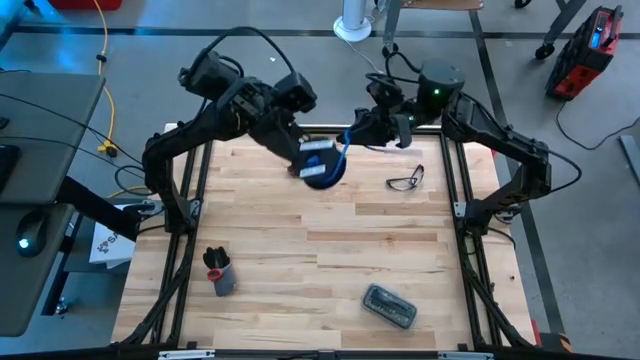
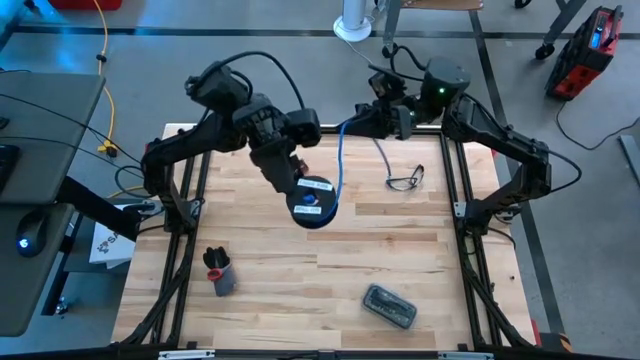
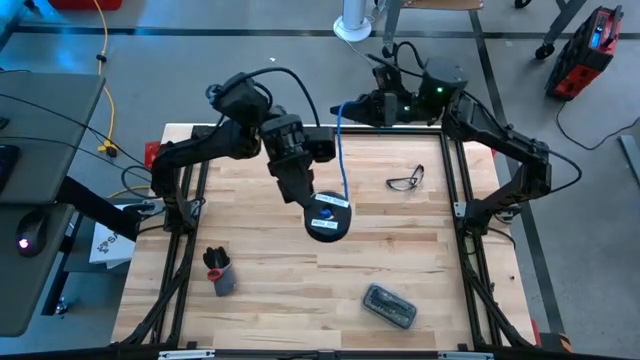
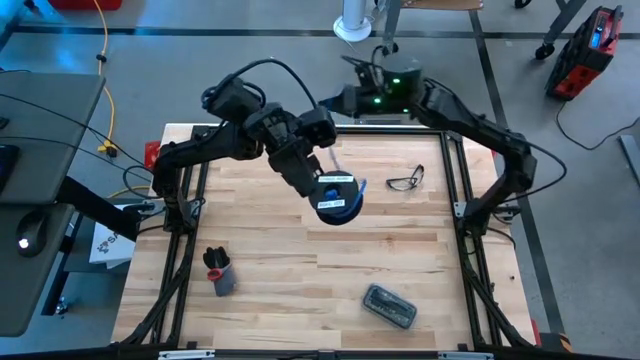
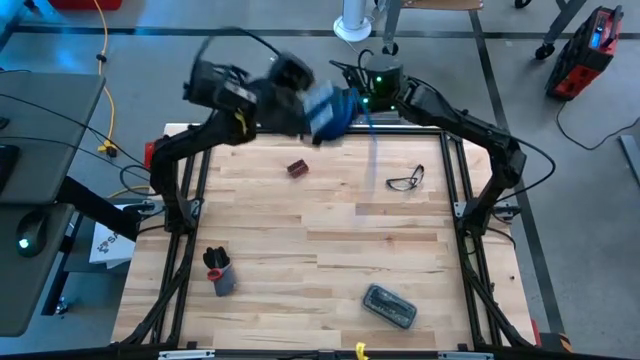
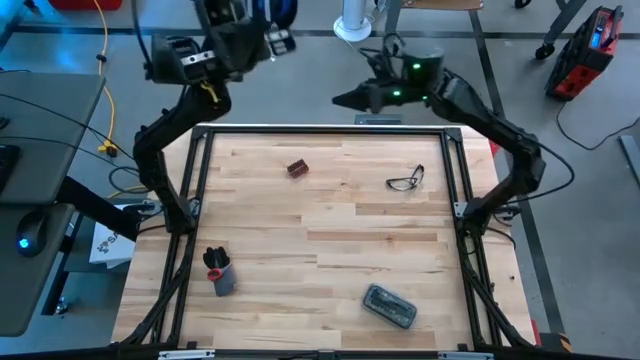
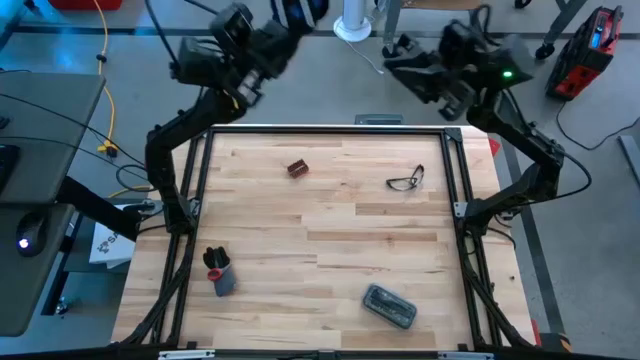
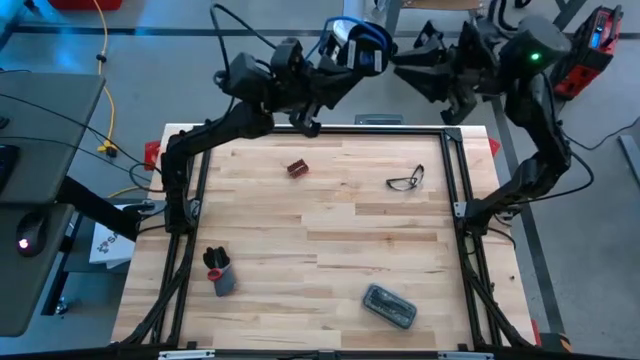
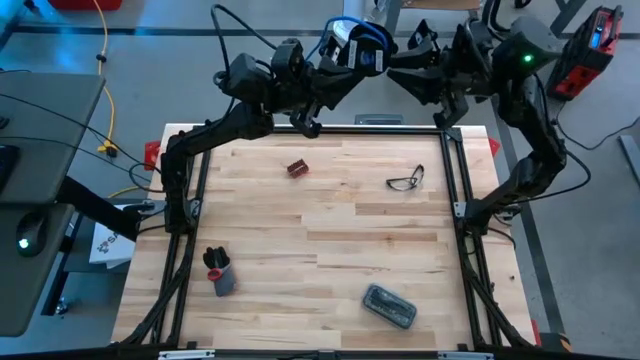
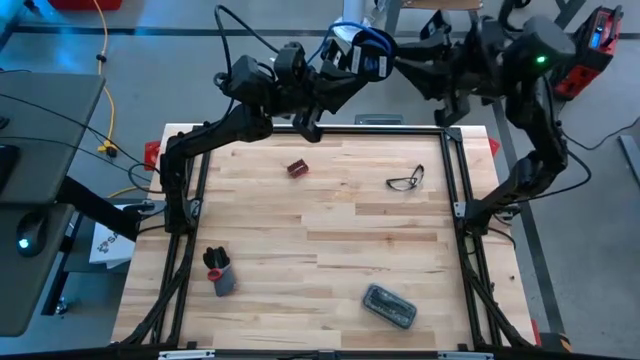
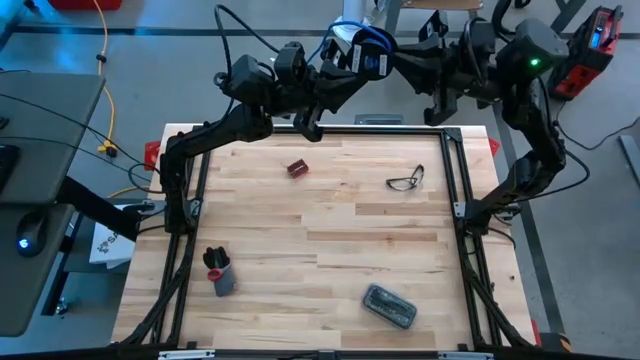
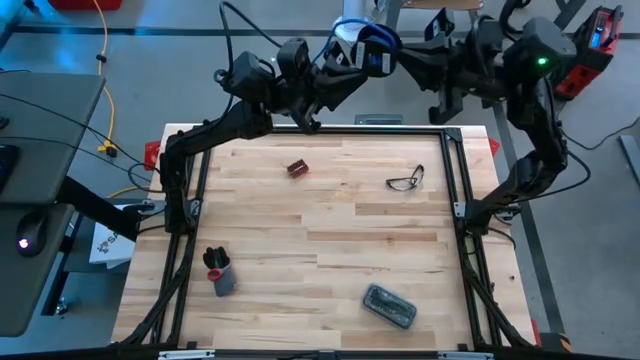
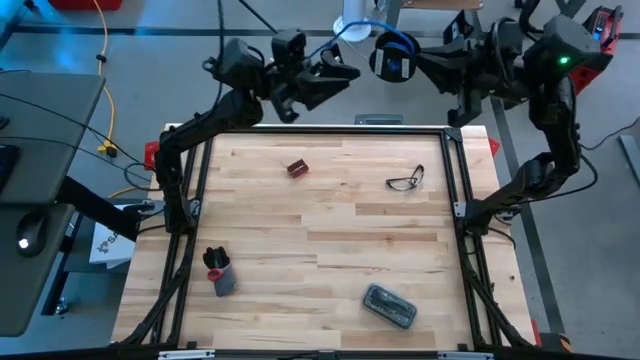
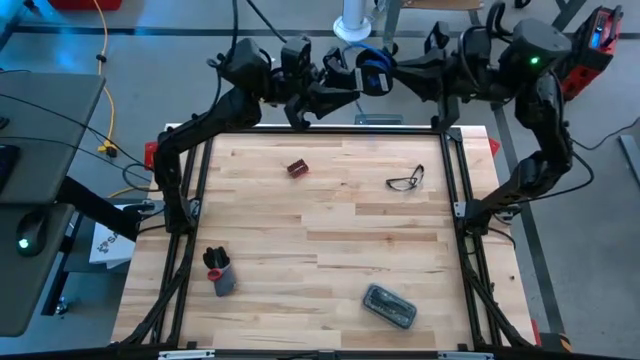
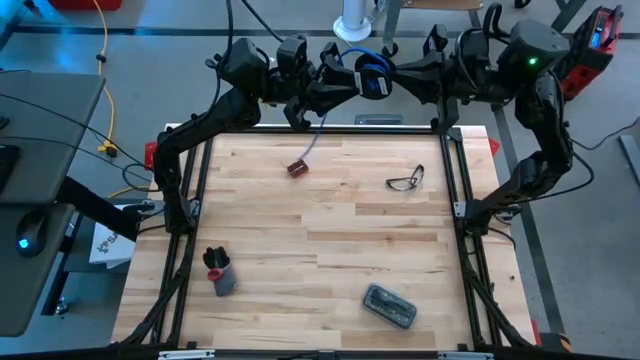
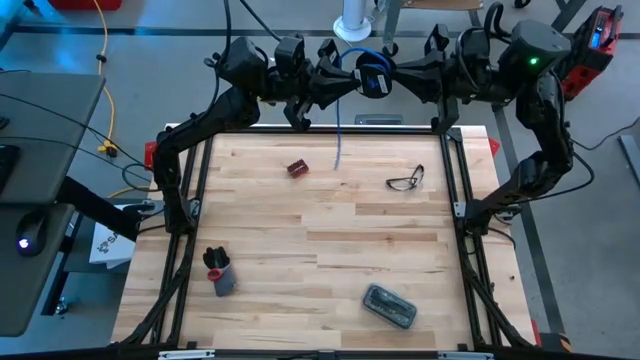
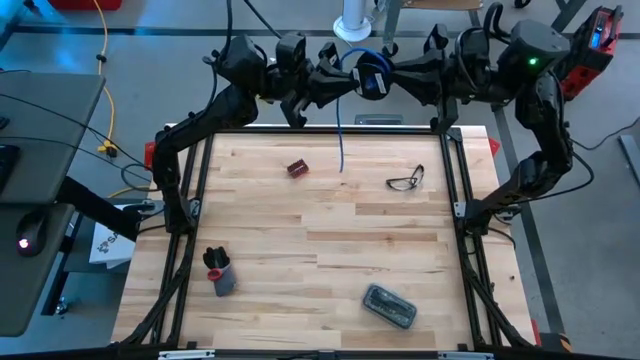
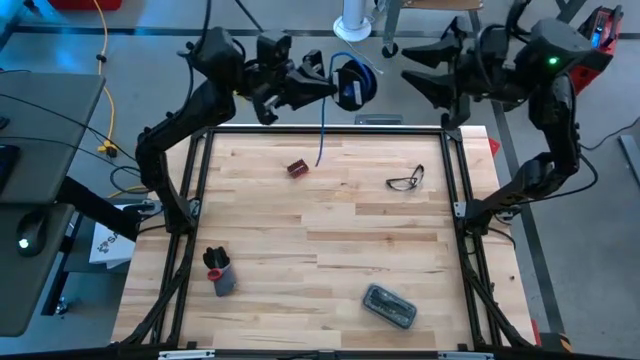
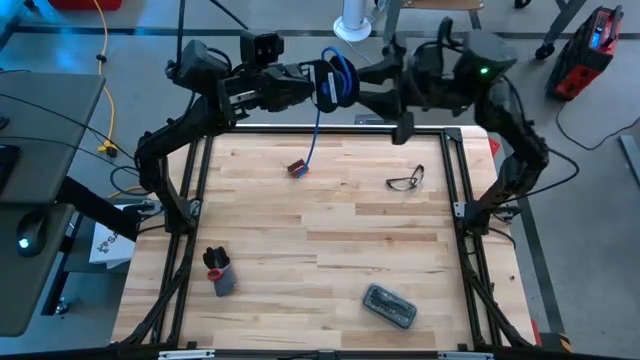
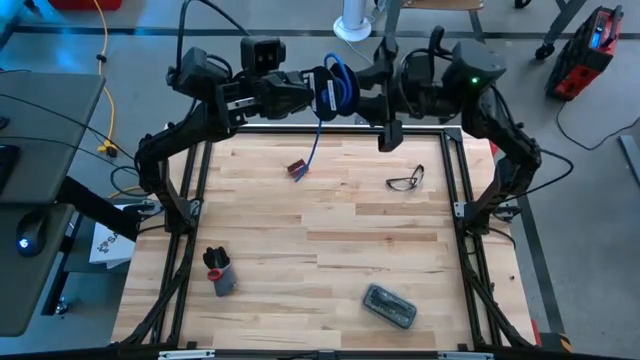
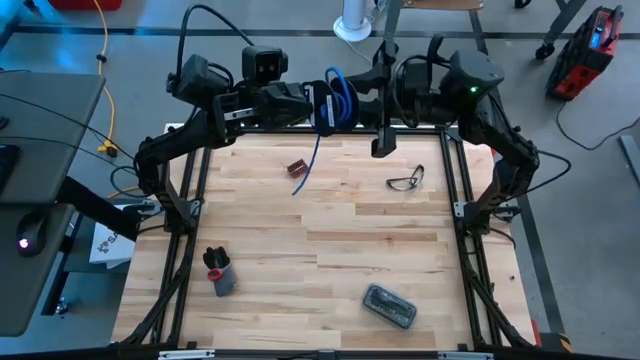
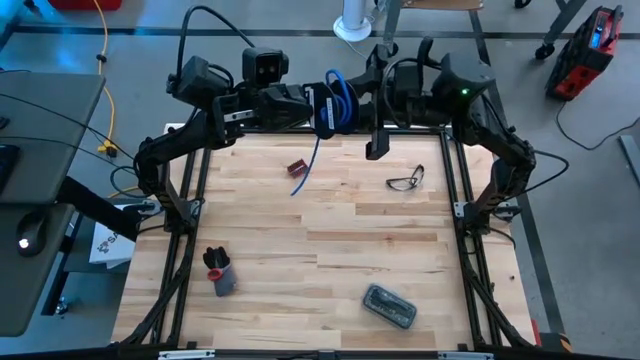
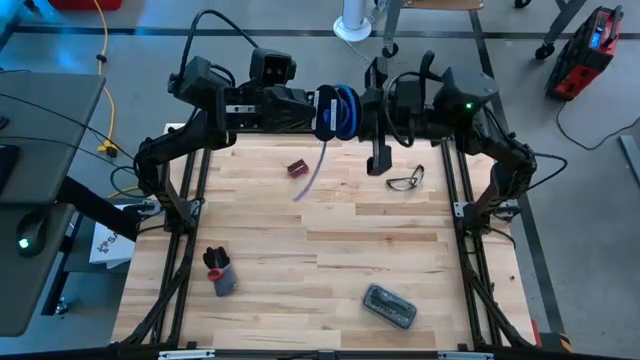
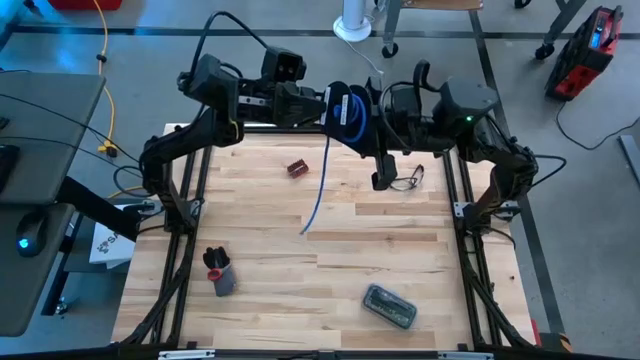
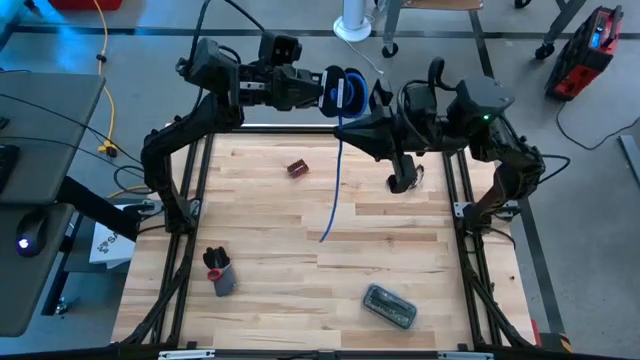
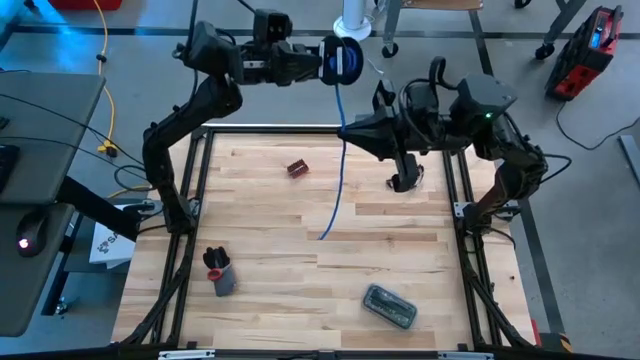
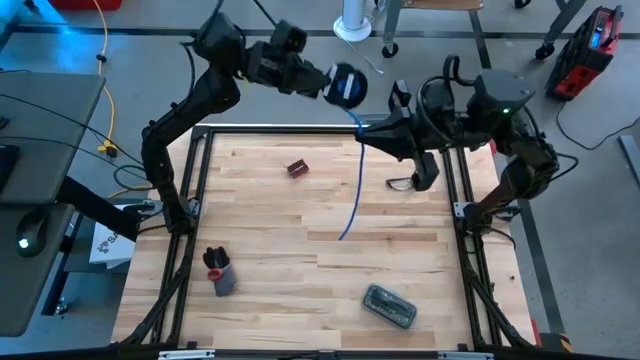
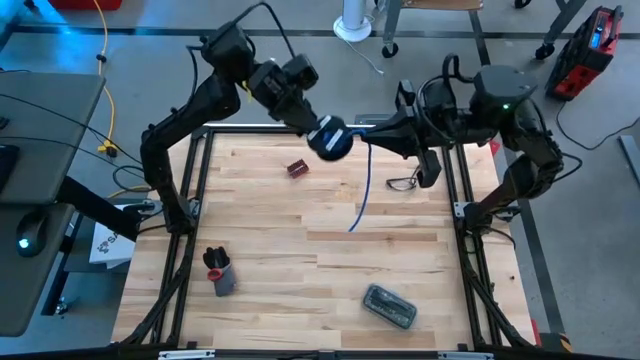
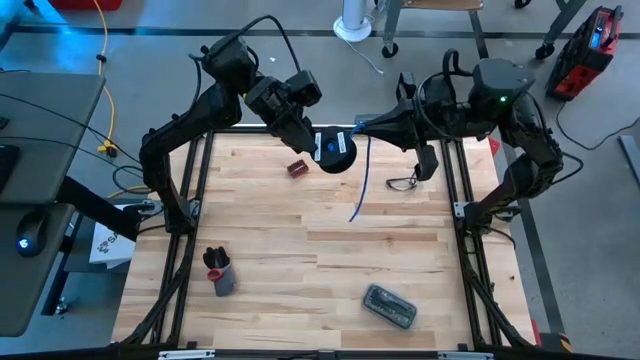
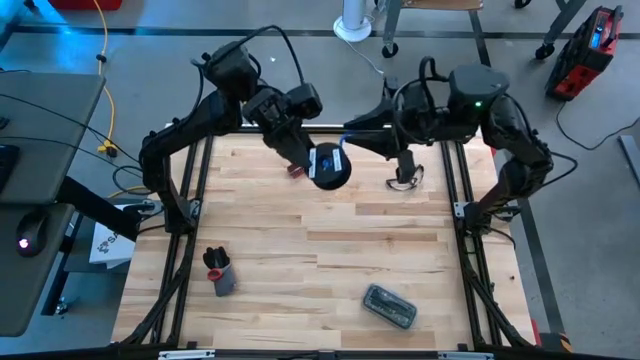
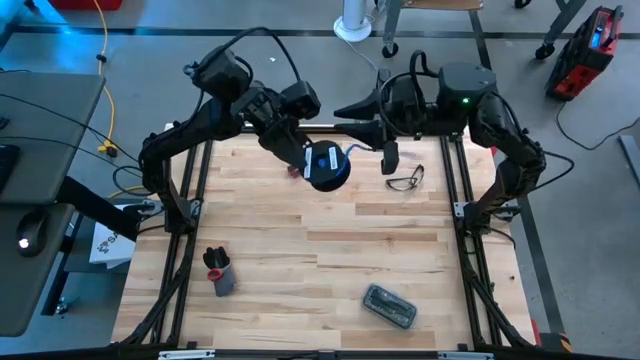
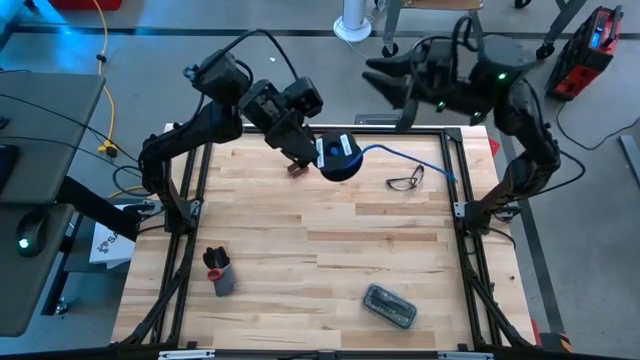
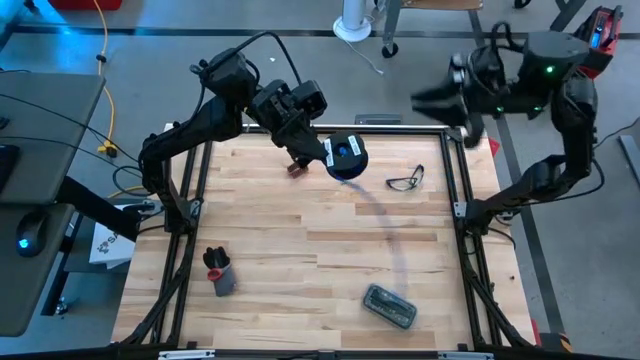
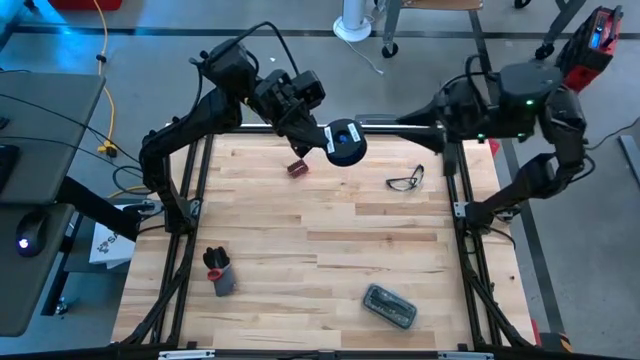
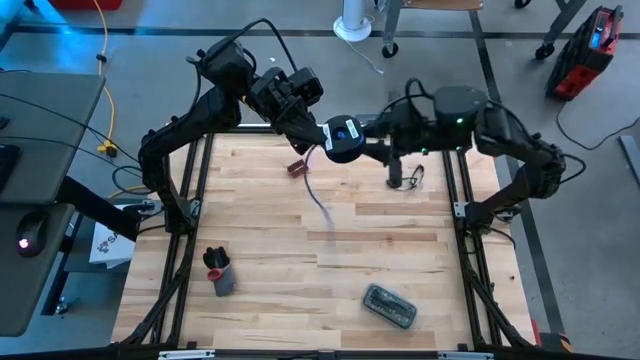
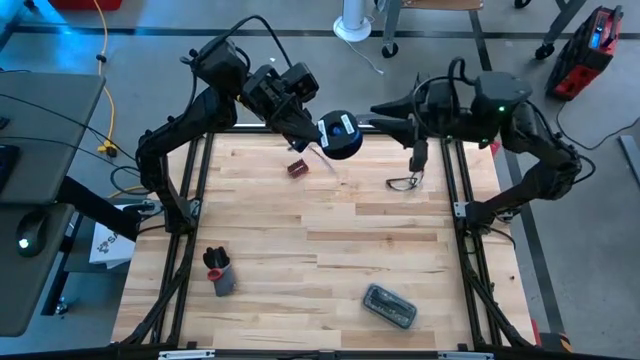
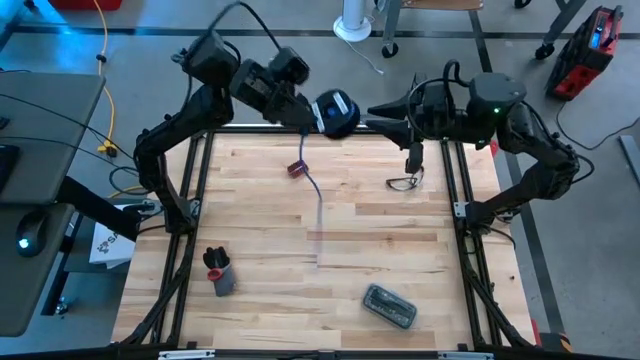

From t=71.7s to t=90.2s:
Task: Coil cords
Coil the blue wire onto the spool
